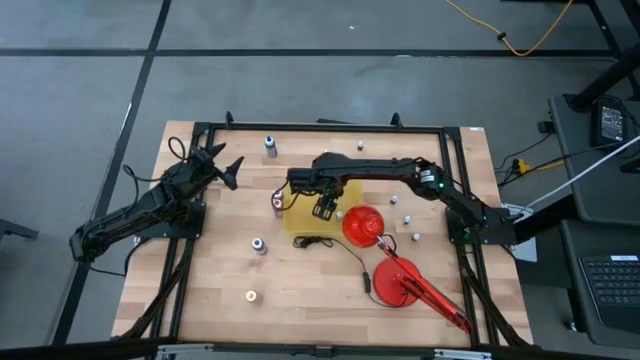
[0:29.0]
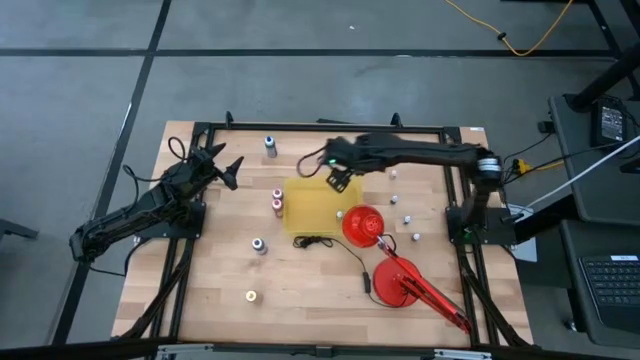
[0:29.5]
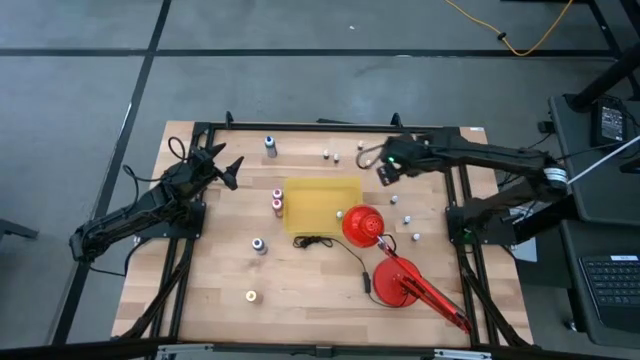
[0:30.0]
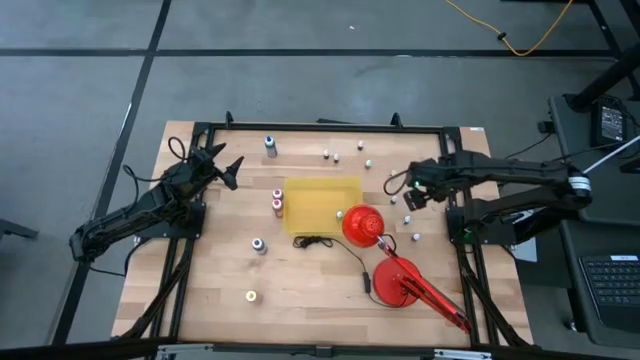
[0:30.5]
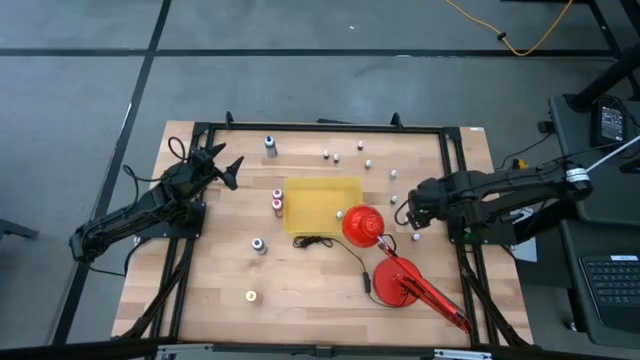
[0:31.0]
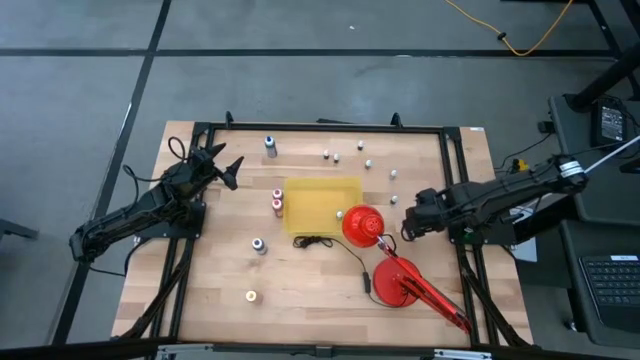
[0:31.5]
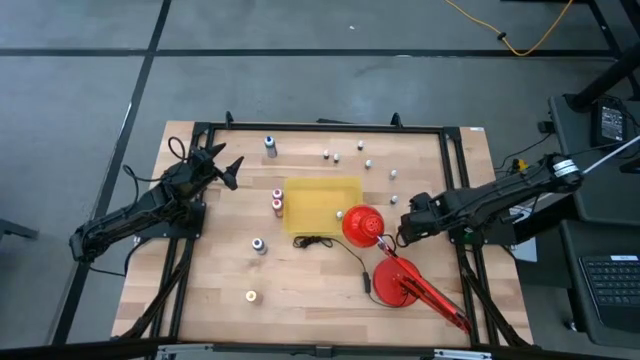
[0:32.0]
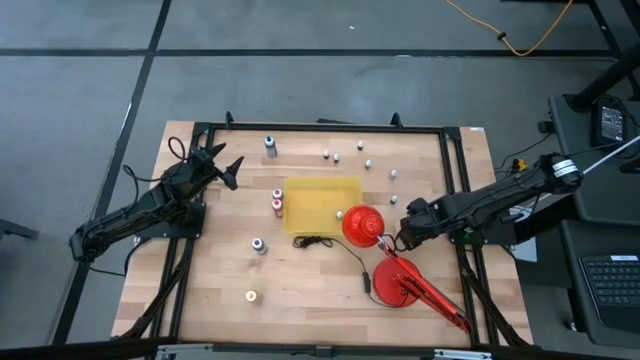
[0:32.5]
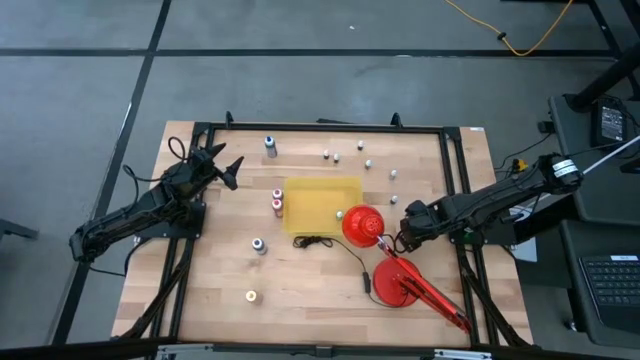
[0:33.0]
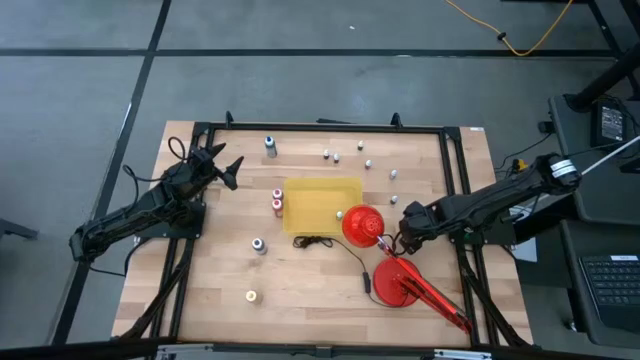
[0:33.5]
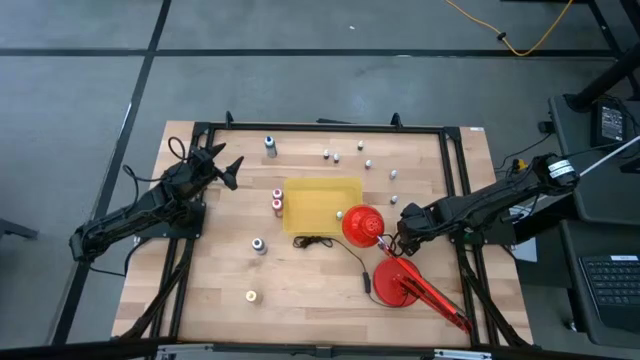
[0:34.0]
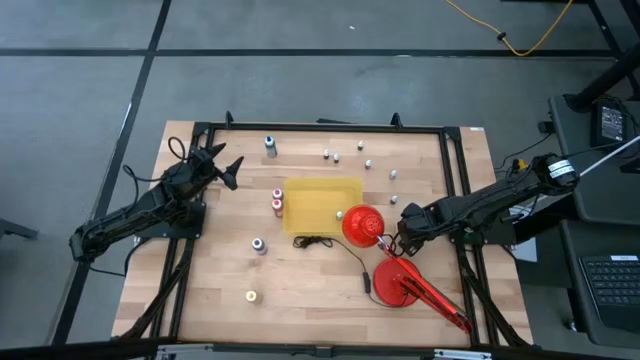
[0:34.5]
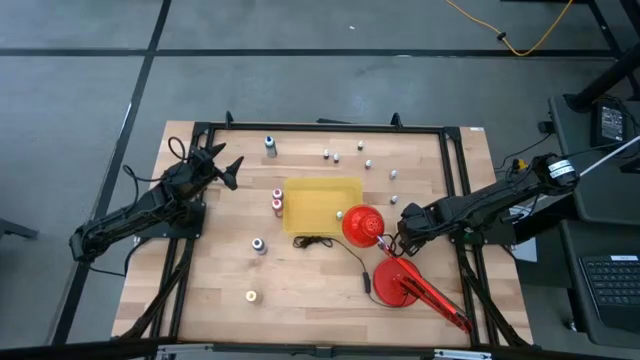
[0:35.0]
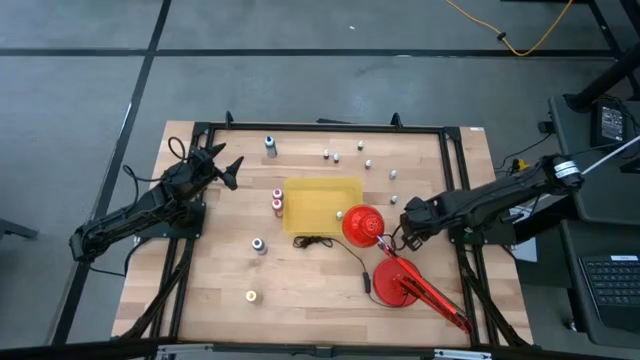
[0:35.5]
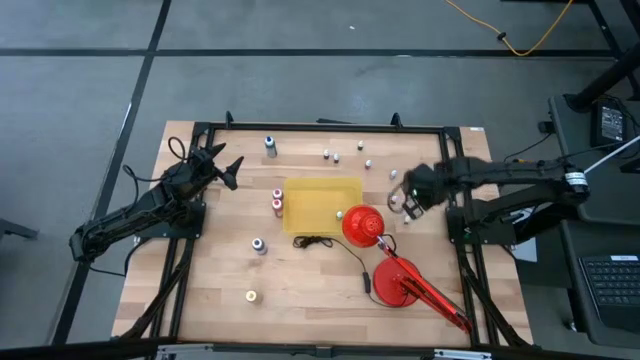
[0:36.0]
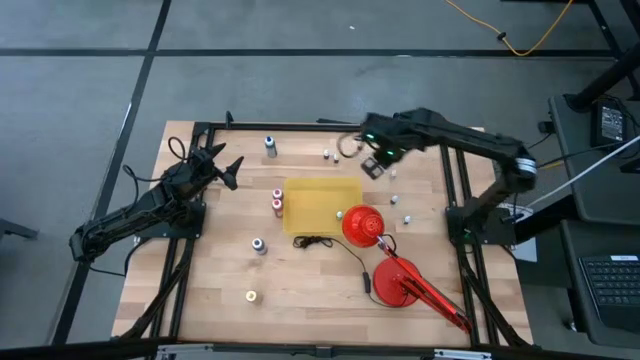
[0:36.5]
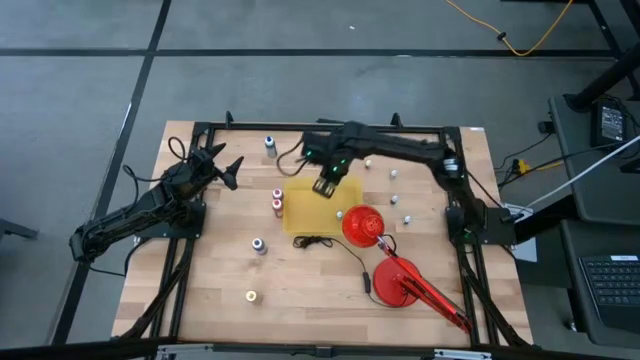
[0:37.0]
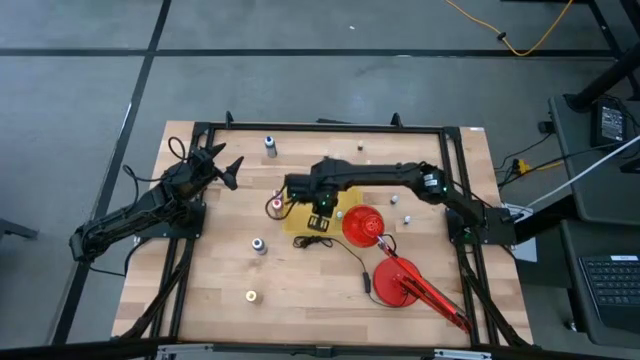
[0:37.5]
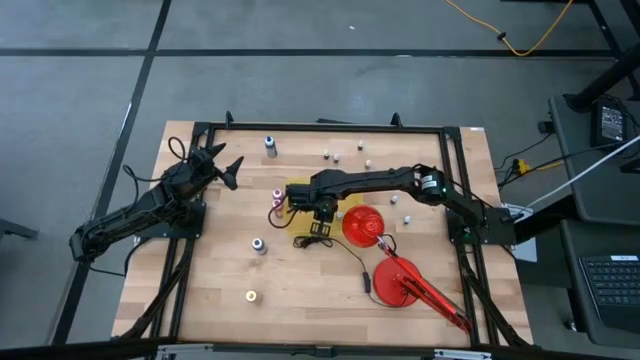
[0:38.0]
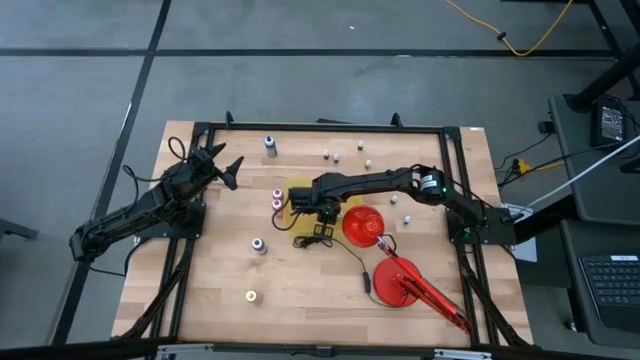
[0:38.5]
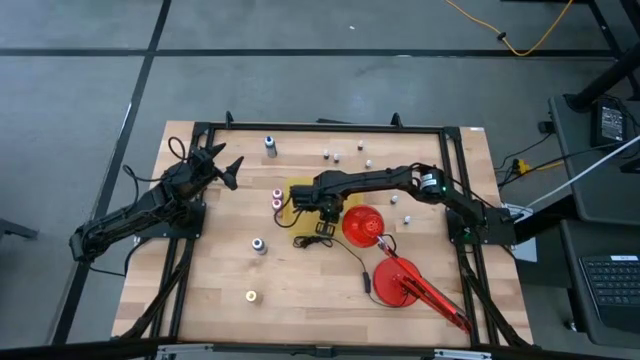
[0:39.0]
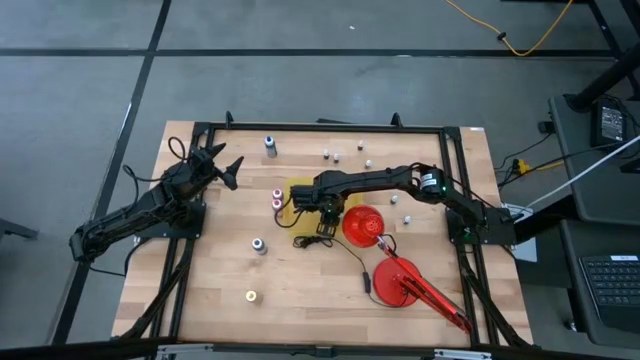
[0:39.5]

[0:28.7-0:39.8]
Task: Pick & Place food coloring
Put the bottom small brown food coloring bottle into the yellow container

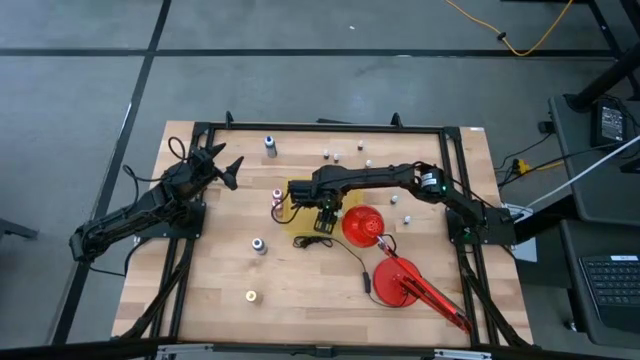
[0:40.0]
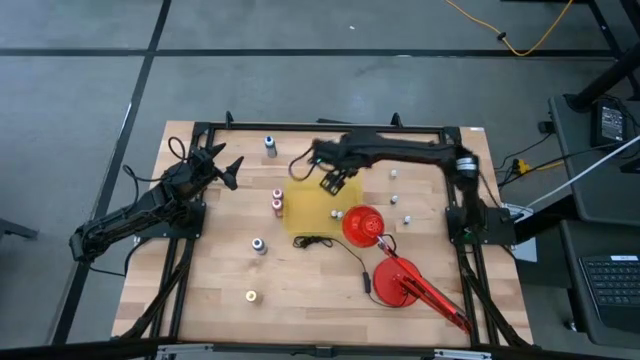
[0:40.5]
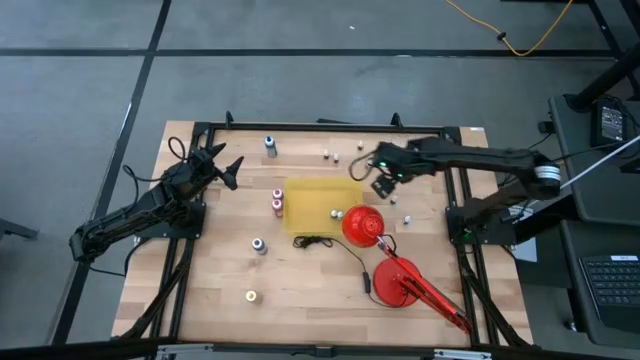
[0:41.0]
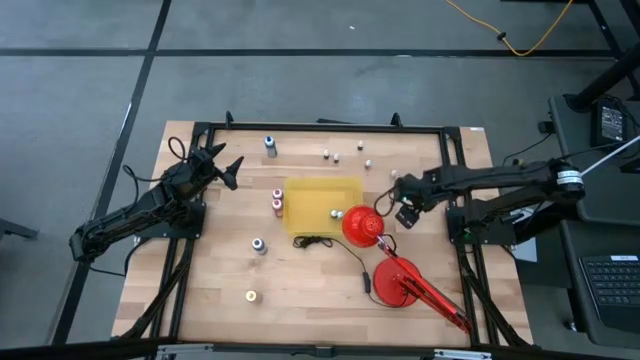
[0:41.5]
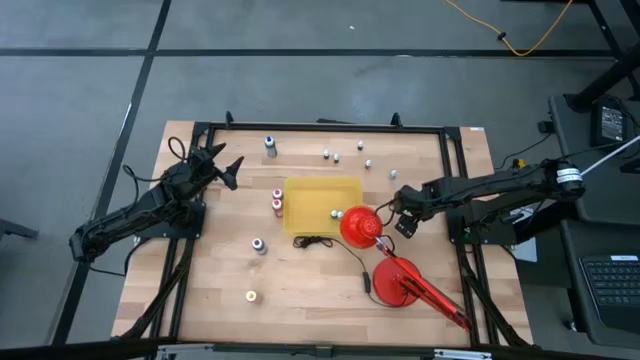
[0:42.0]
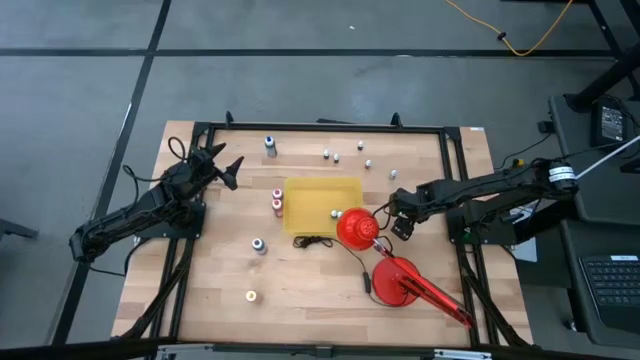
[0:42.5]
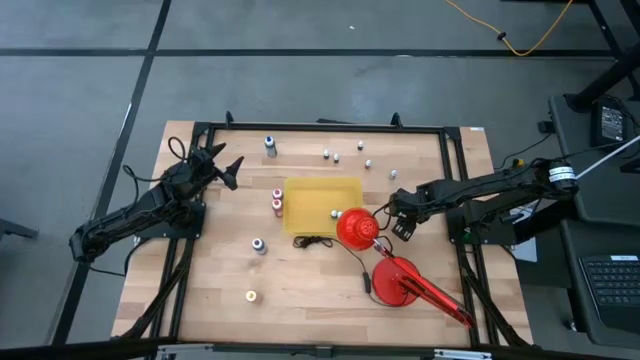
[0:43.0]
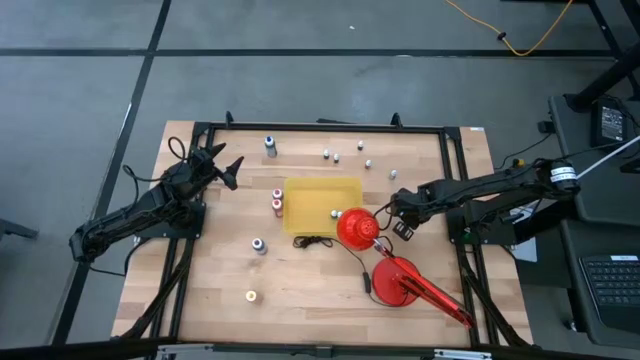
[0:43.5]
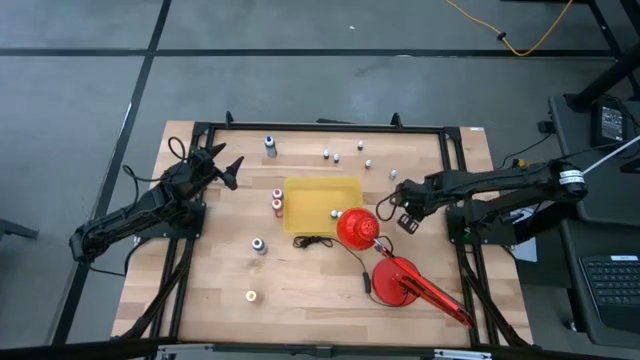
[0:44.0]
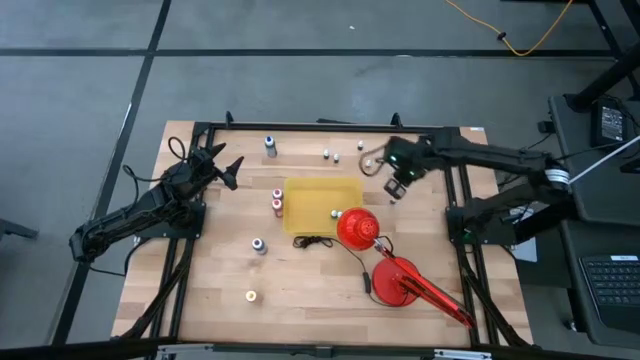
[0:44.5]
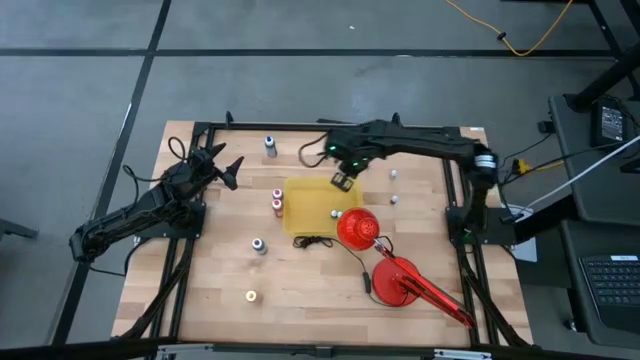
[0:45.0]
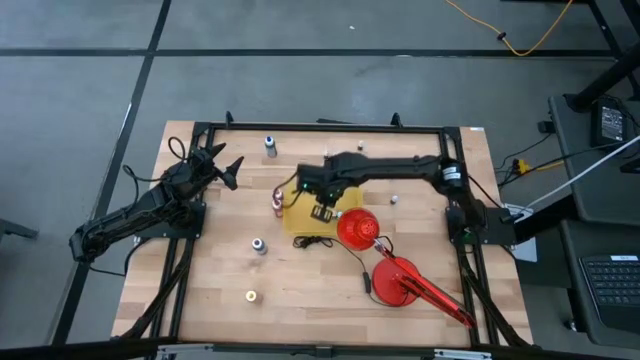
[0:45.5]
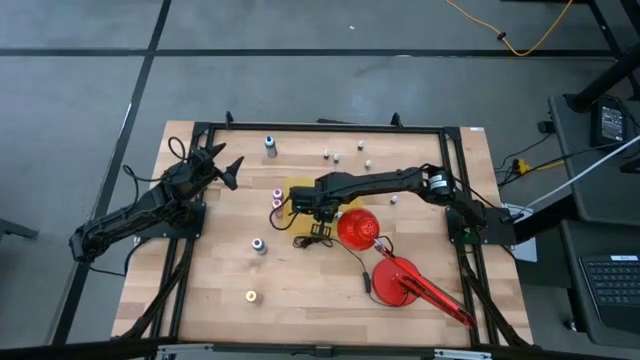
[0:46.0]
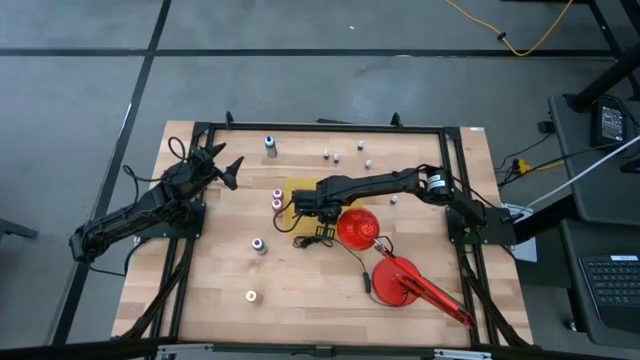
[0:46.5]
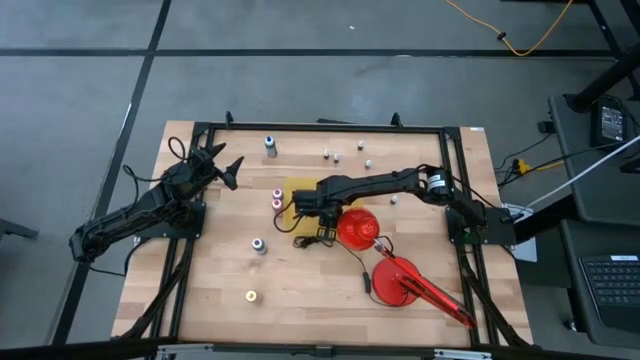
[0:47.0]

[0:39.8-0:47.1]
Put the small purple food coloring bottle into the yellow container

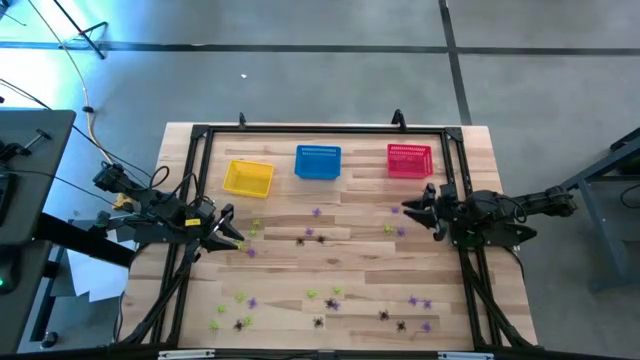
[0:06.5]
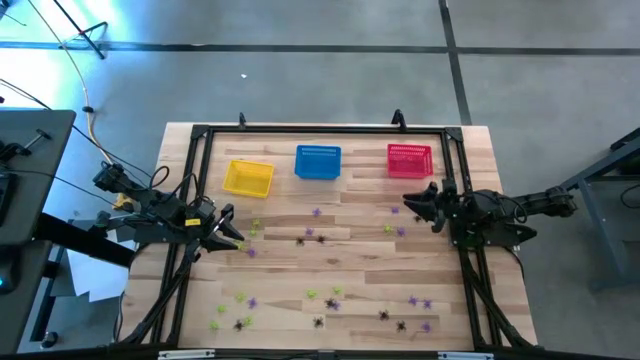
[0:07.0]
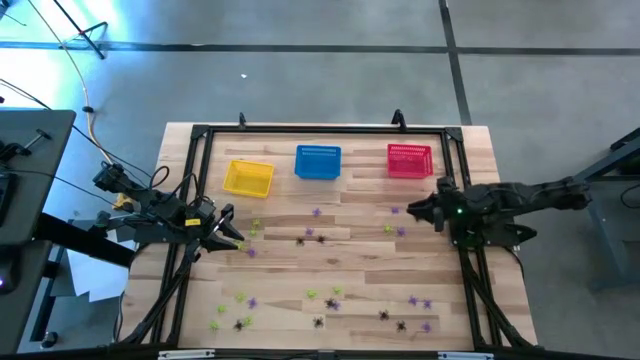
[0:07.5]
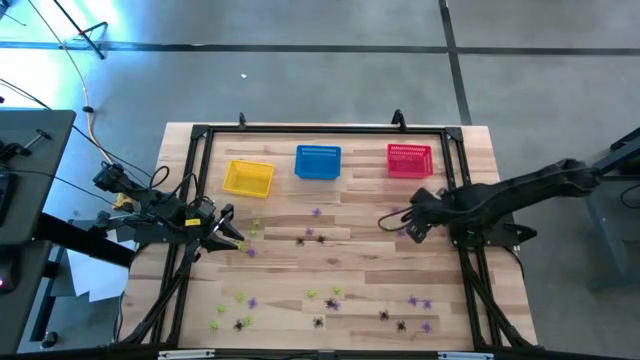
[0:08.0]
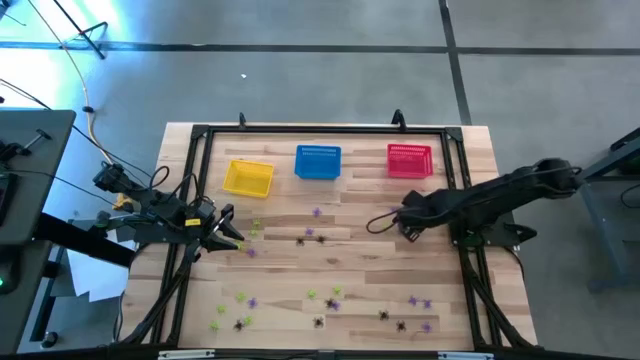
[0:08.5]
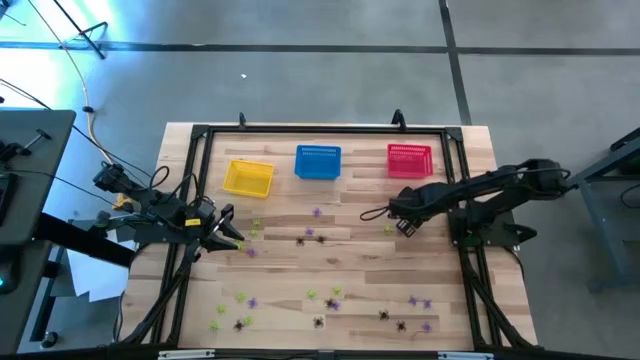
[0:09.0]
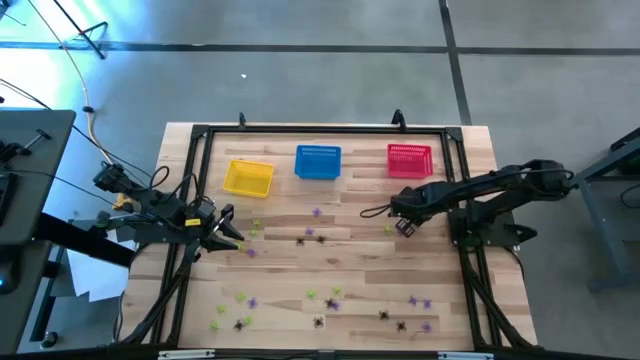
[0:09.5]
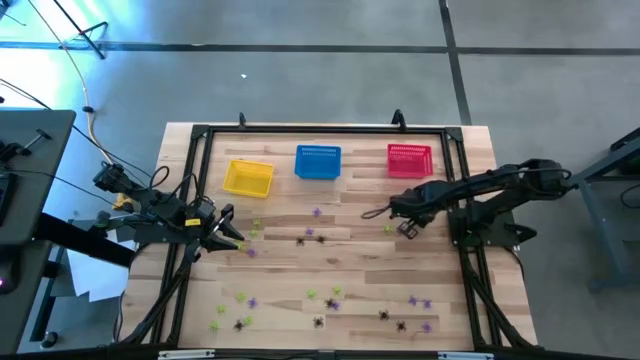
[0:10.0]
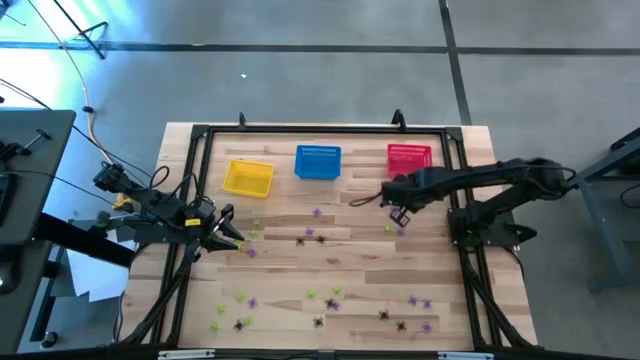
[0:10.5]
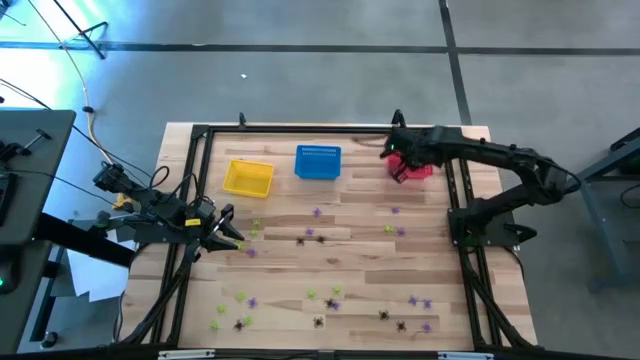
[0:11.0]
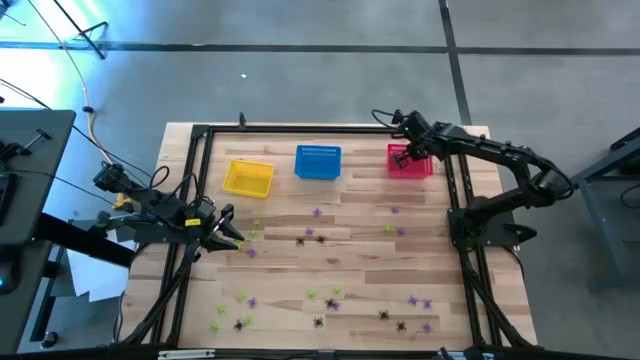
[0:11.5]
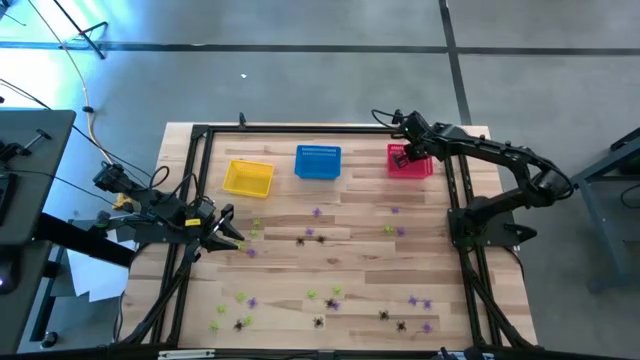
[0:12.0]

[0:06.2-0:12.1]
Task: Sort Halloween decoration
Put the black spider toy into the red bin
